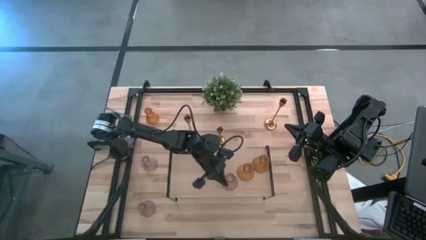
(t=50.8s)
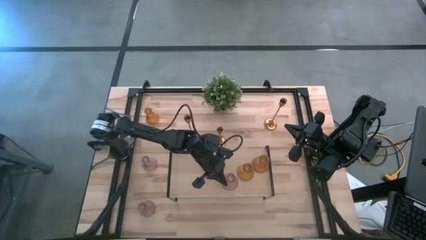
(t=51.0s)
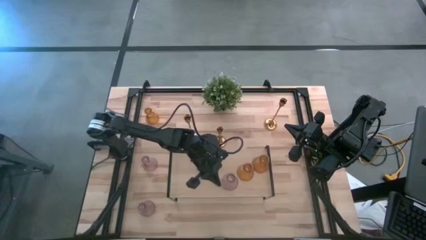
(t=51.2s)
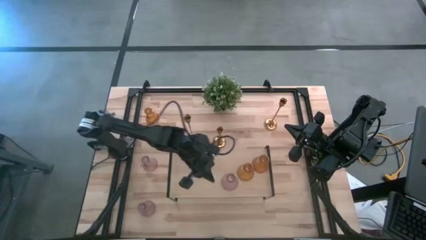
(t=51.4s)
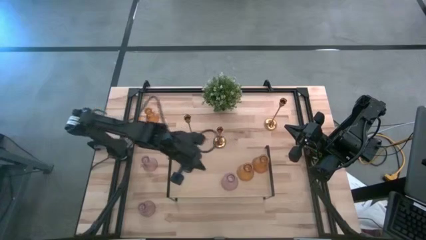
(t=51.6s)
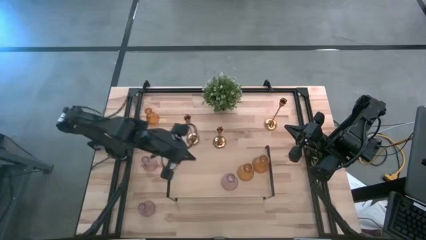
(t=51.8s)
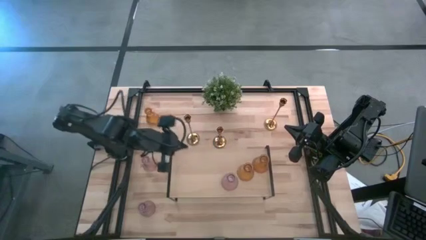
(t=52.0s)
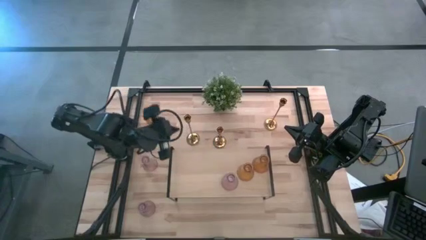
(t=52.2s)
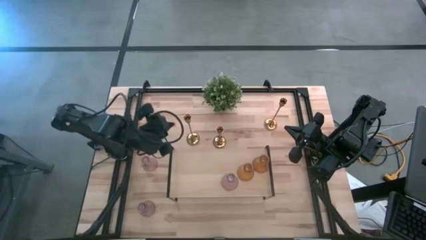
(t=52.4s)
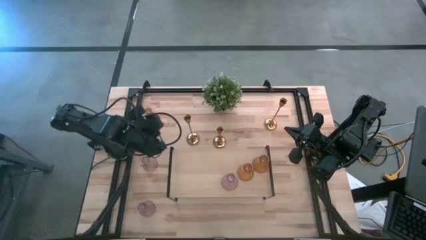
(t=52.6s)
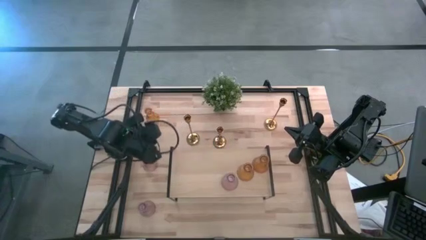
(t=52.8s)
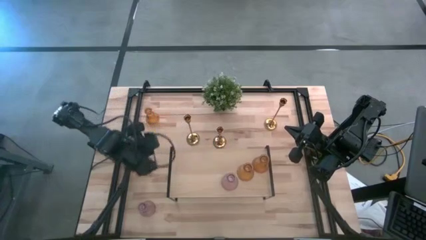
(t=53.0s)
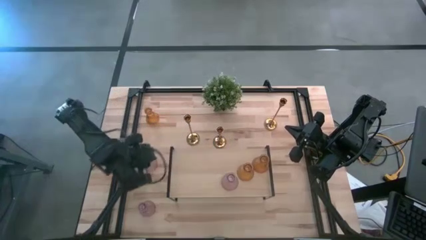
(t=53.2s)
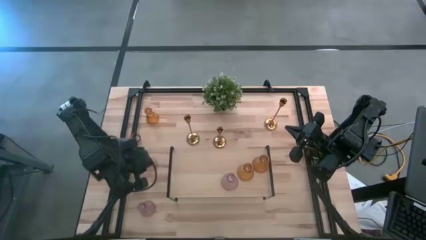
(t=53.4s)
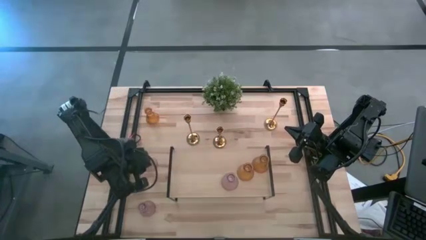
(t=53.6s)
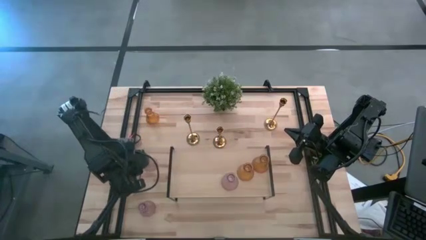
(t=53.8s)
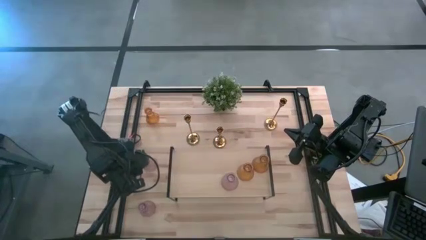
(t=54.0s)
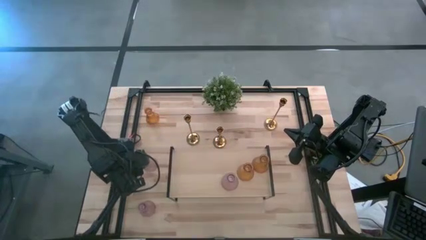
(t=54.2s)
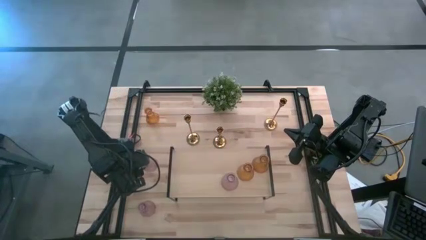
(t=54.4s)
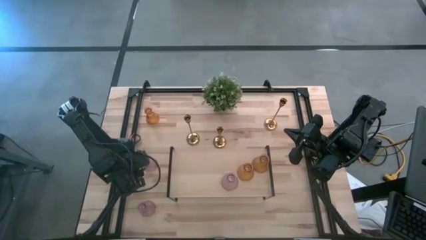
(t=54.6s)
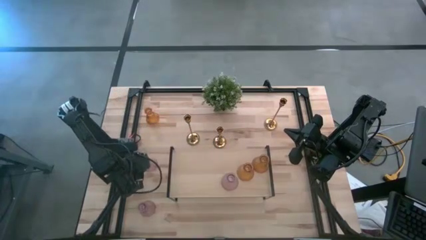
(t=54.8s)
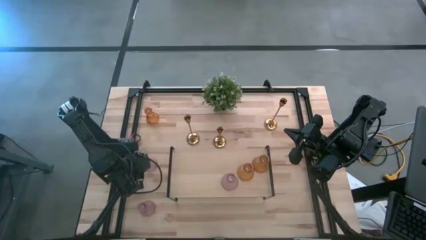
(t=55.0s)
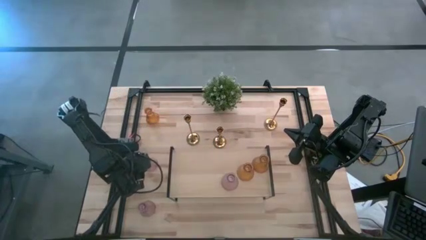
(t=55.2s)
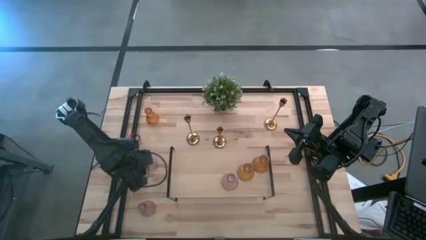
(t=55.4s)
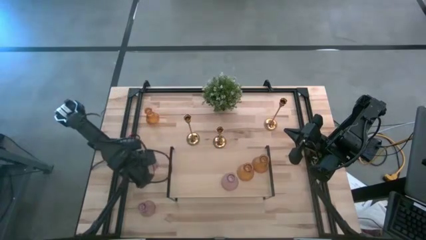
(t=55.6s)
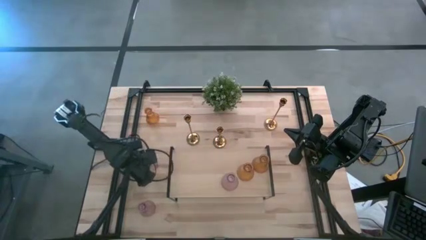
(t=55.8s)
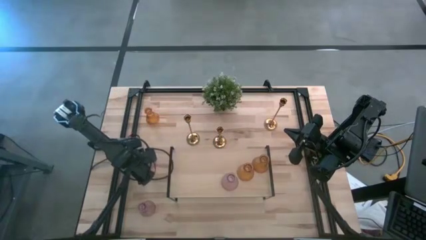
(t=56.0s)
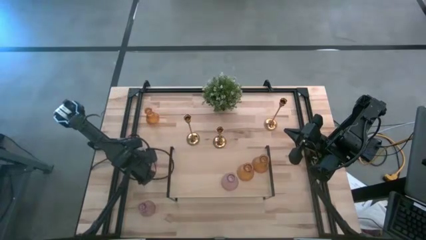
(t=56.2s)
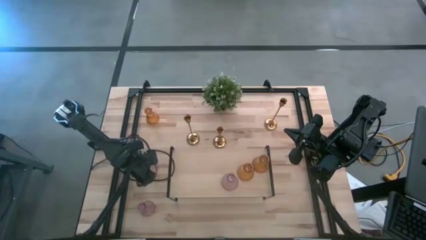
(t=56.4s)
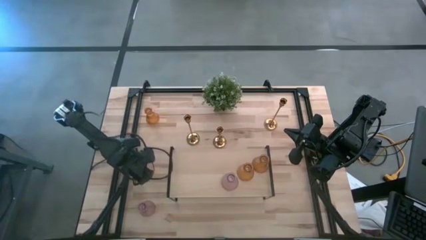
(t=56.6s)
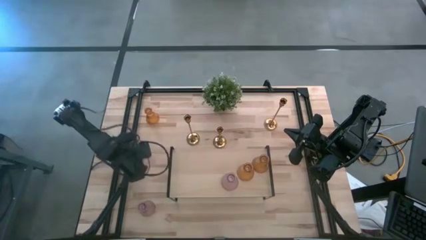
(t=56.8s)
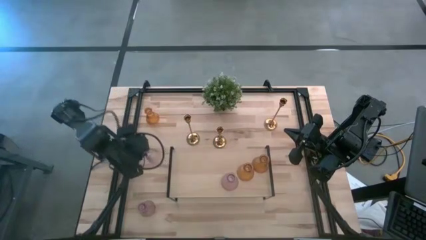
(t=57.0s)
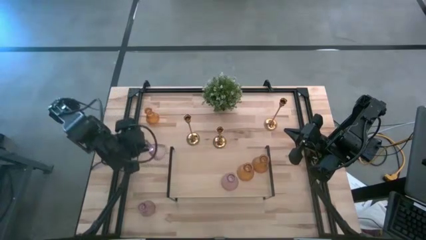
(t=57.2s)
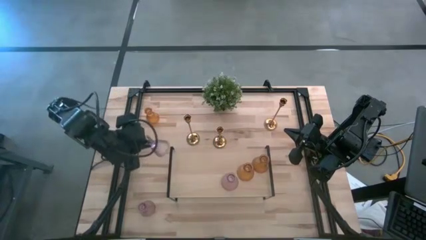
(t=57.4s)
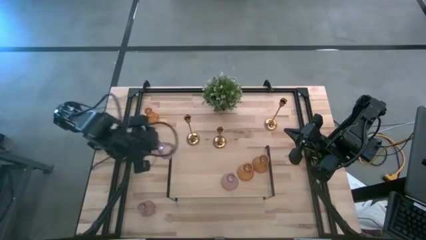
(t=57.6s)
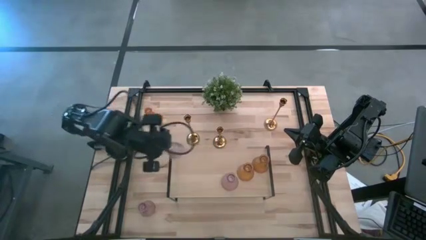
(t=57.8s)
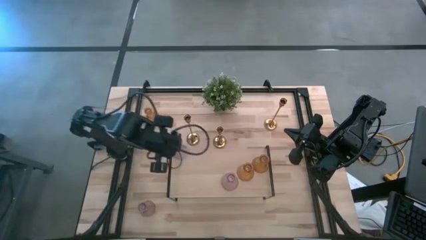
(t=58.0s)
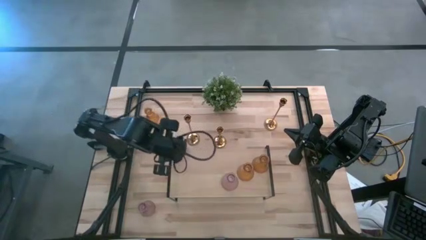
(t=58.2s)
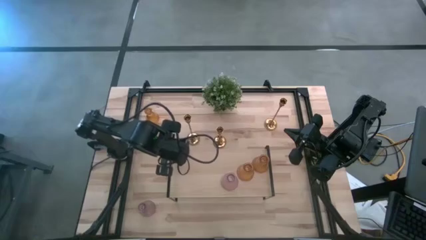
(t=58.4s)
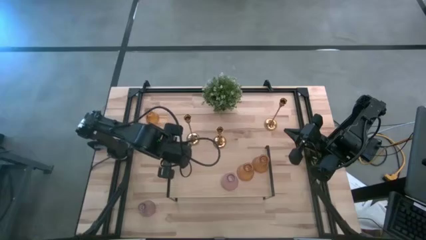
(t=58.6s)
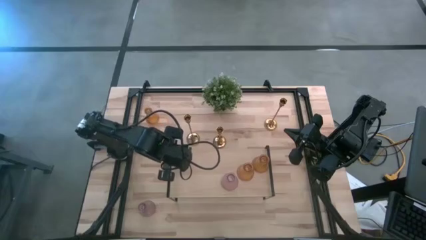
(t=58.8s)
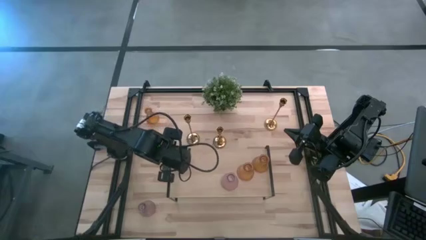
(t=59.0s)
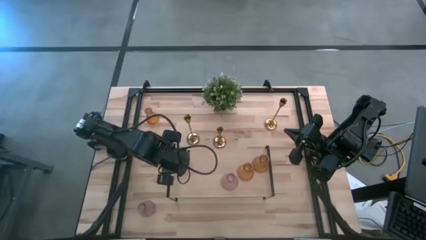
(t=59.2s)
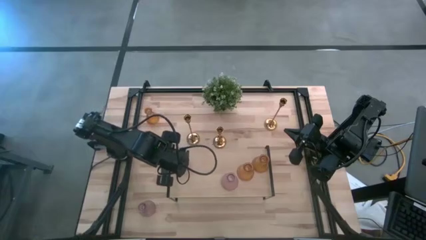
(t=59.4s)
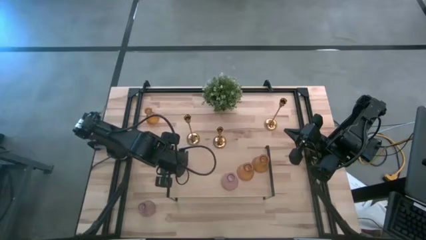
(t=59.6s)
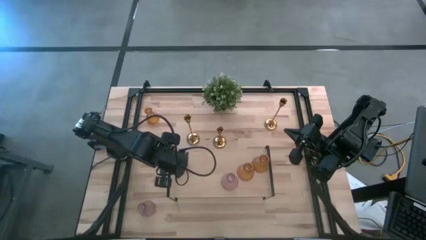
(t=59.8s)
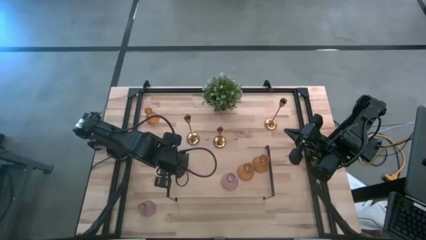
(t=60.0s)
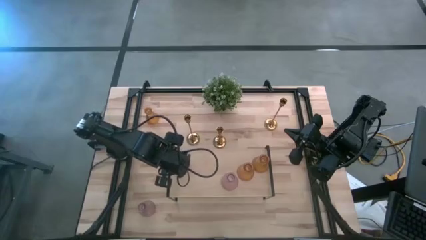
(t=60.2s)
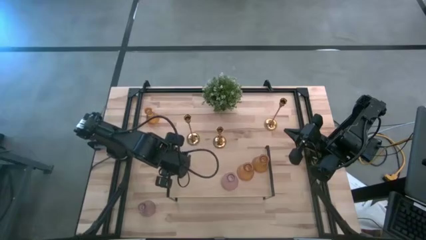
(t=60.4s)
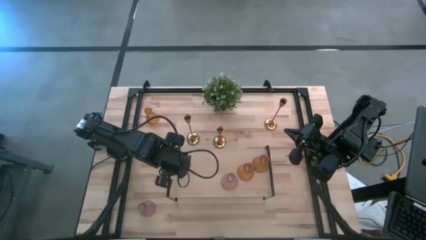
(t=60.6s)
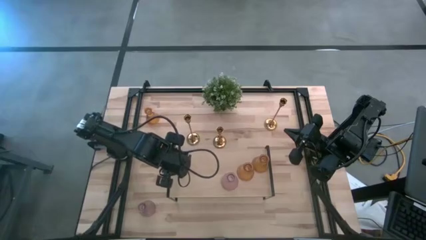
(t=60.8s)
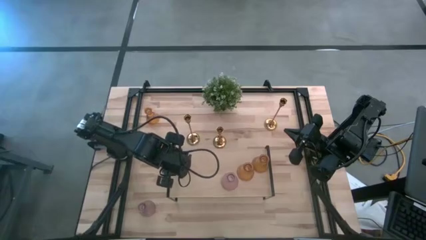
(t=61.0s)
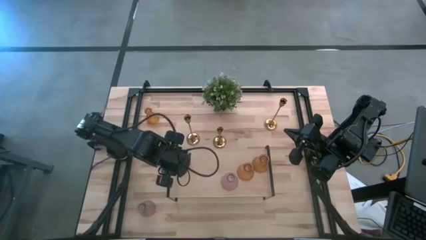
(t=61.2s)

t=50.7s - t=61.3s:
Task: Pick & Place candle stick holders
Put the top violet candle holder on the shelf
